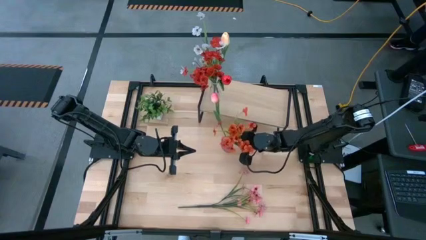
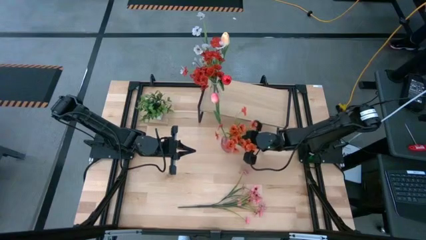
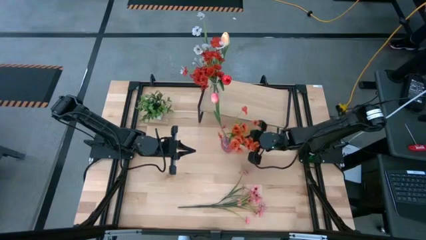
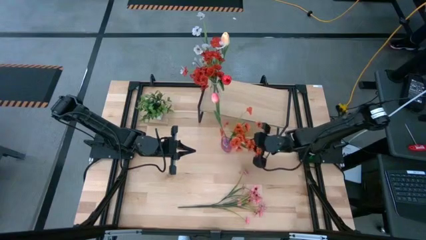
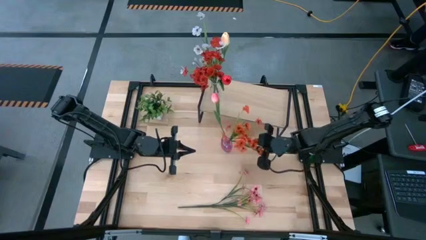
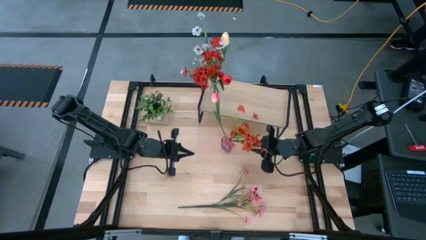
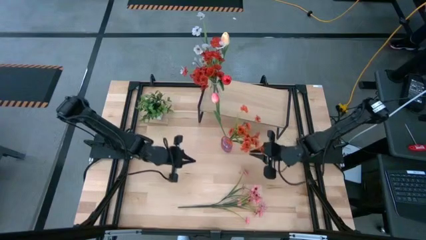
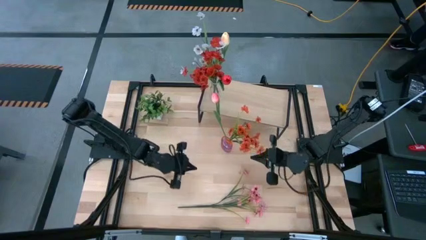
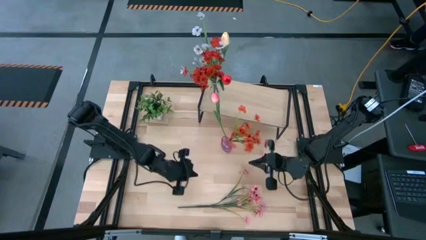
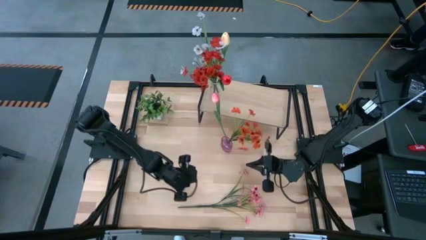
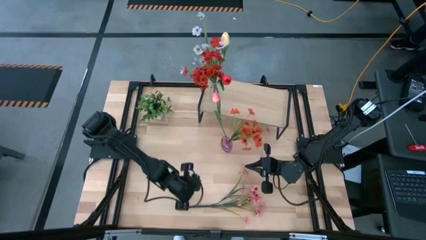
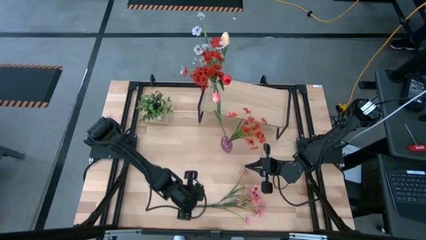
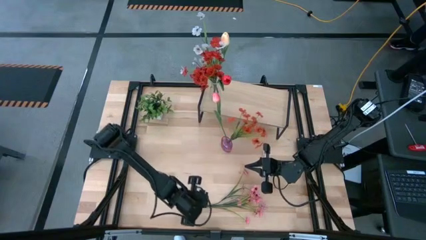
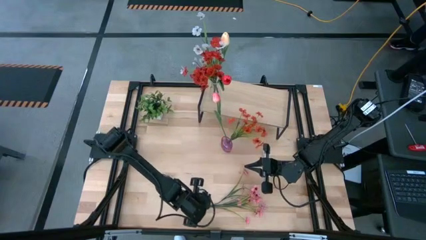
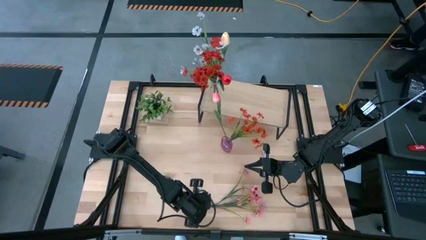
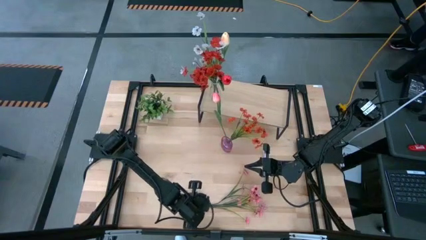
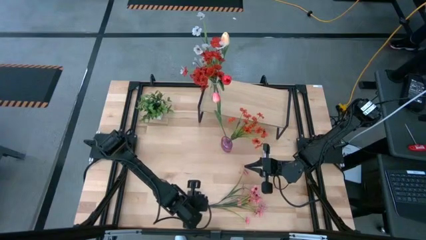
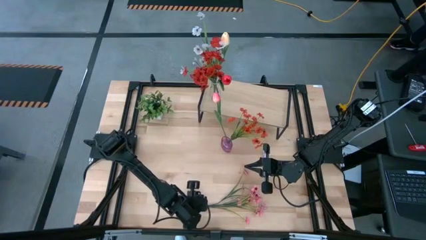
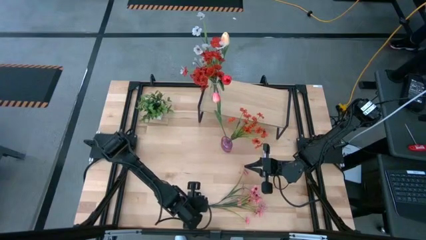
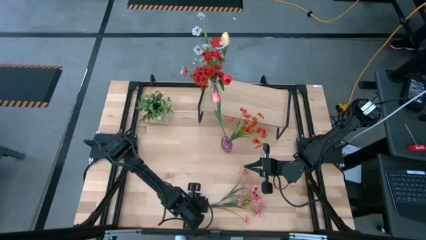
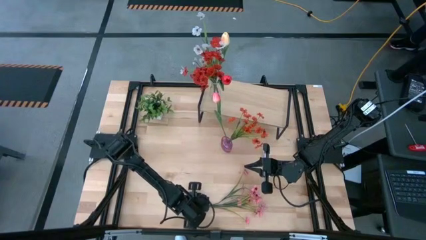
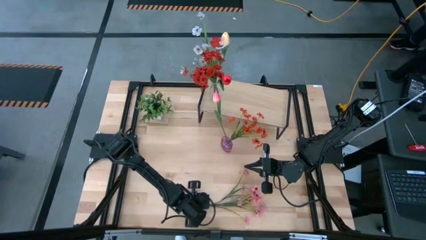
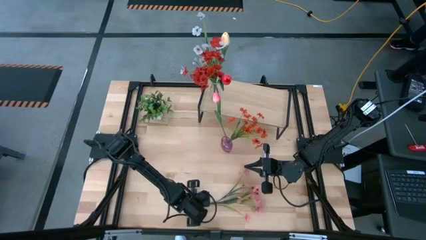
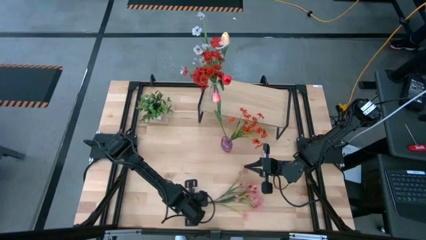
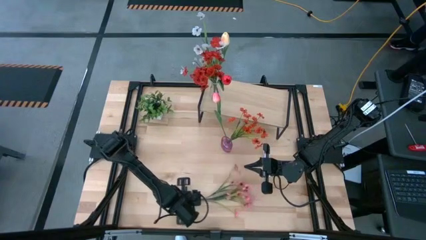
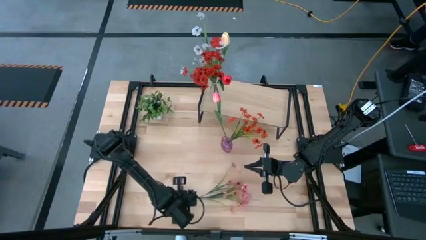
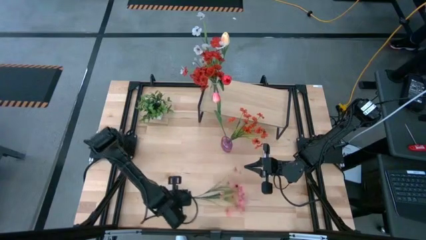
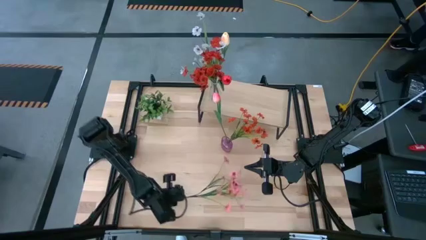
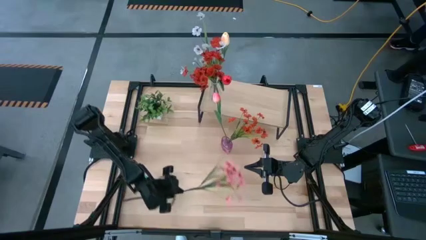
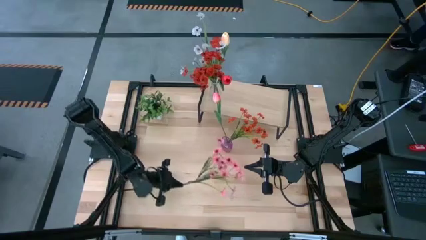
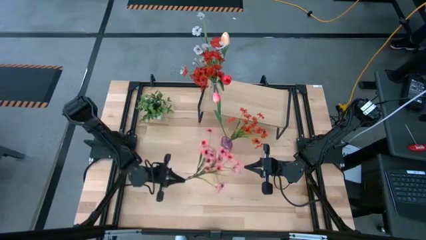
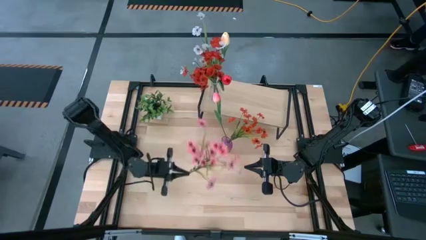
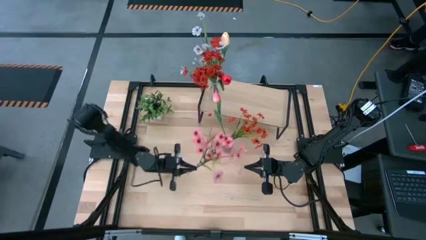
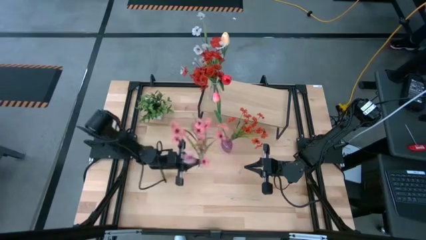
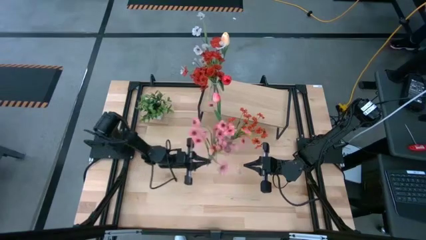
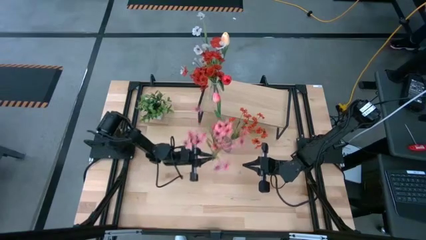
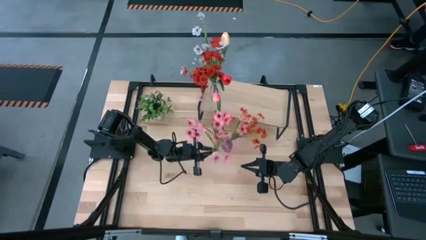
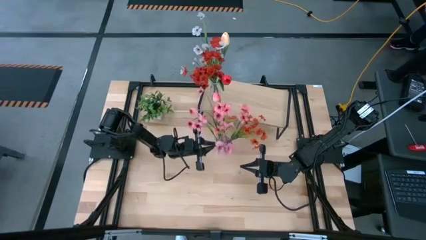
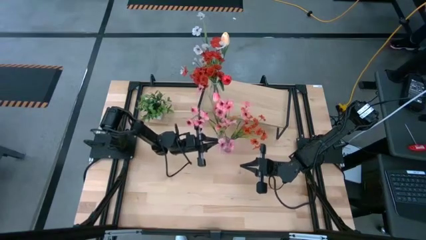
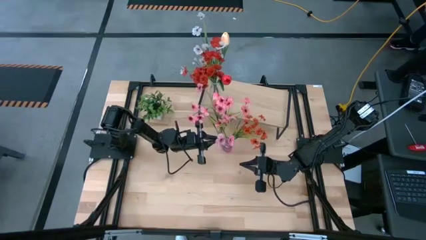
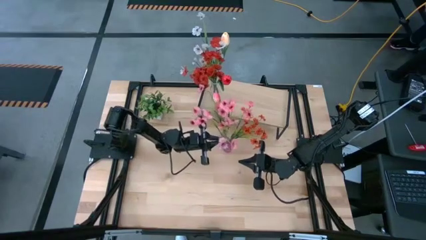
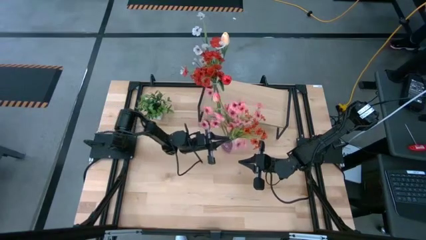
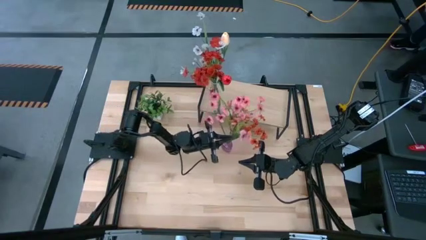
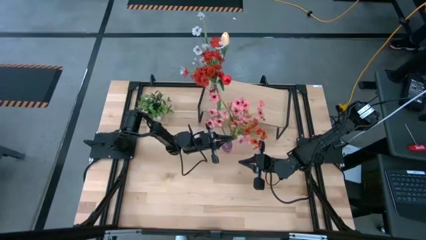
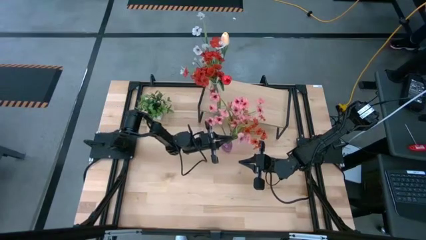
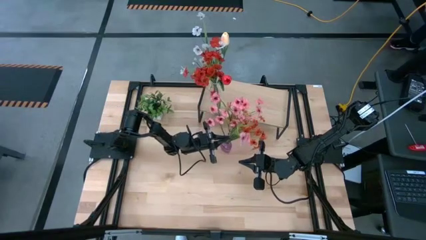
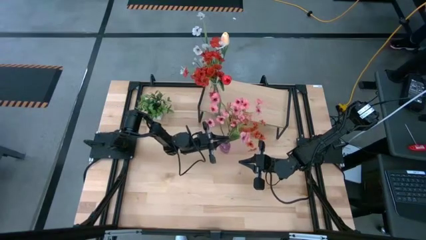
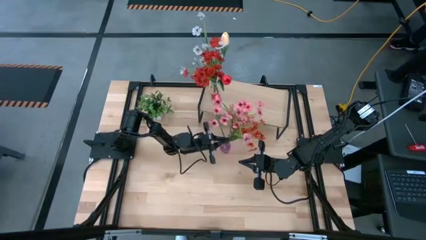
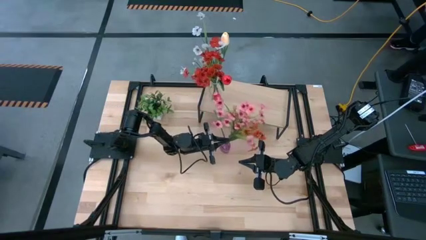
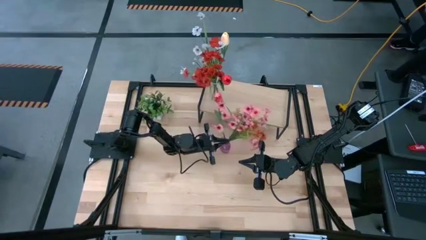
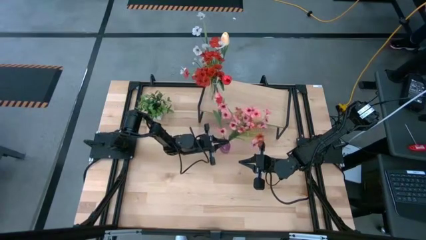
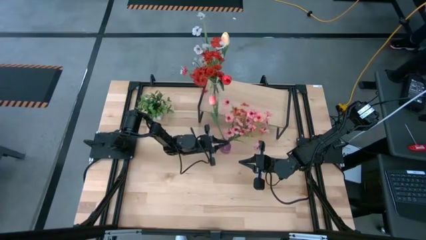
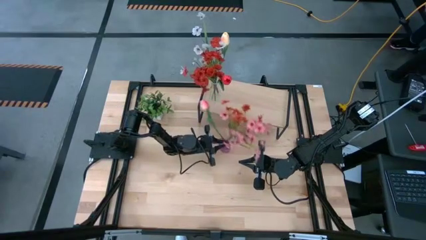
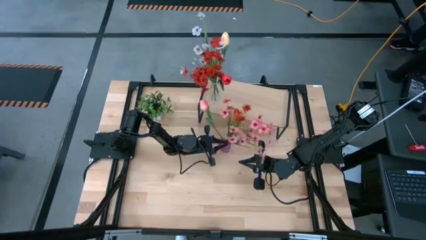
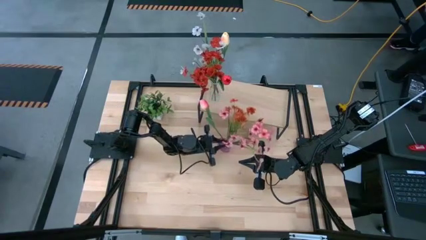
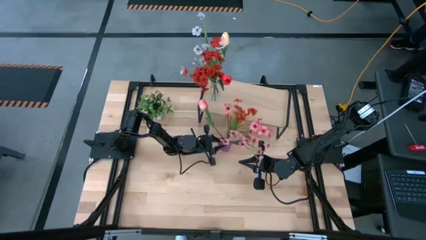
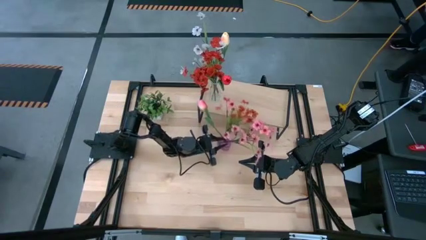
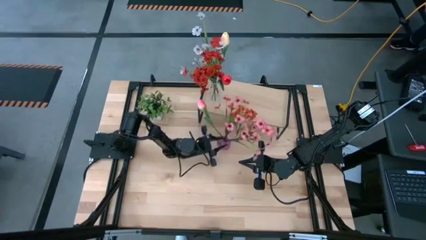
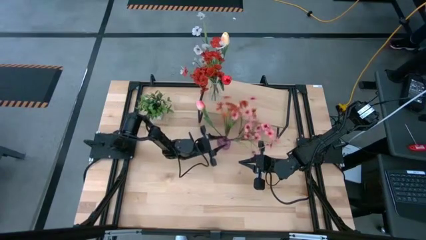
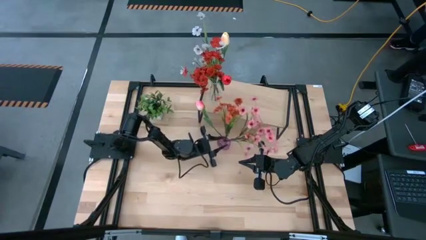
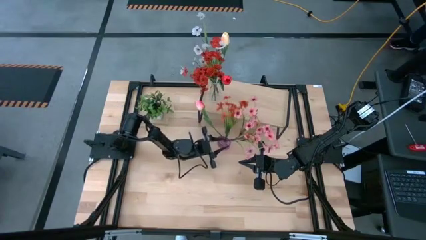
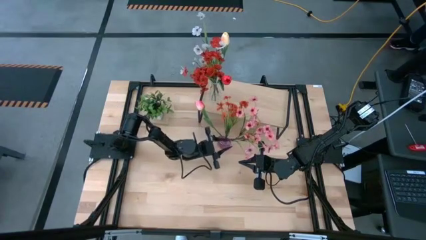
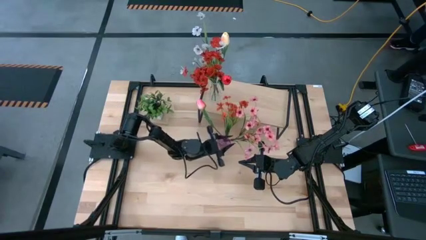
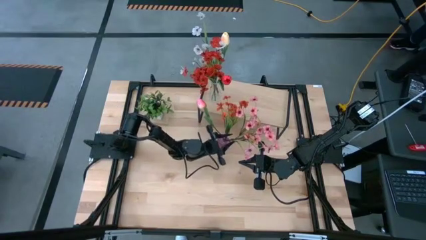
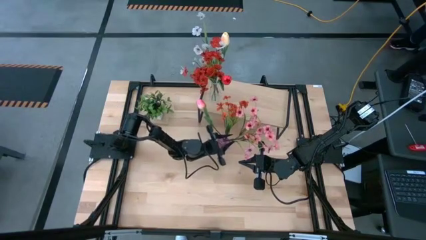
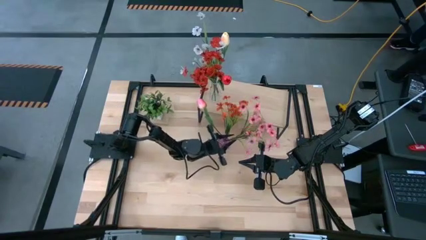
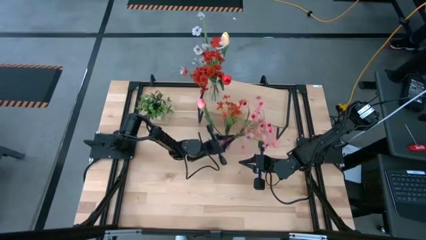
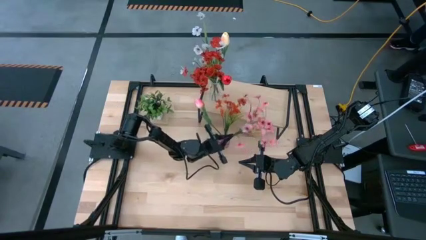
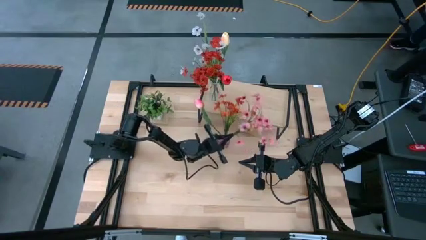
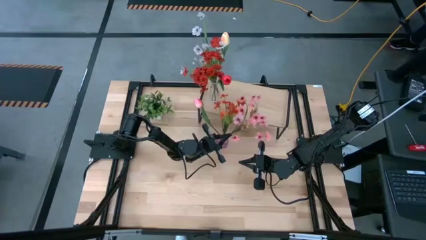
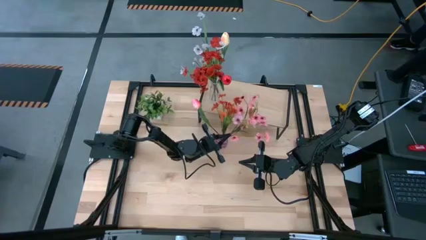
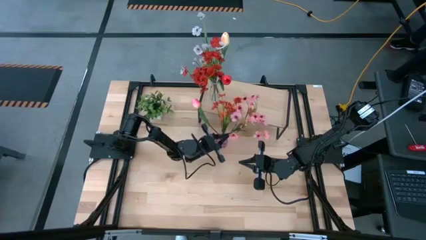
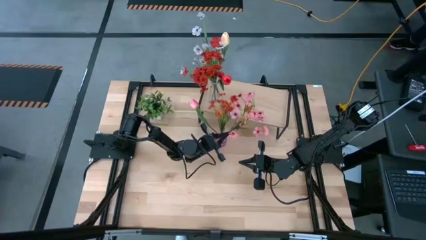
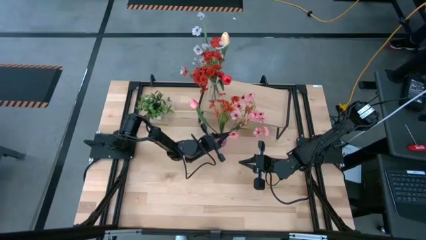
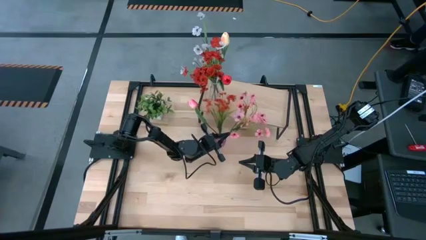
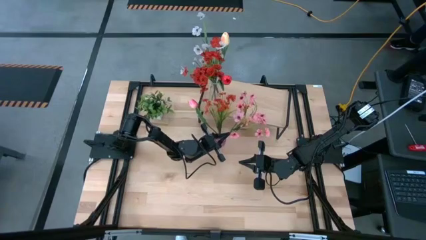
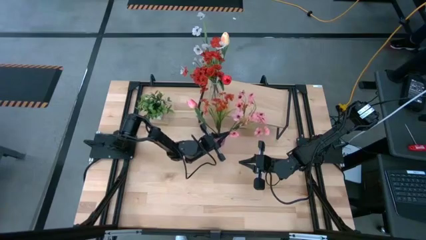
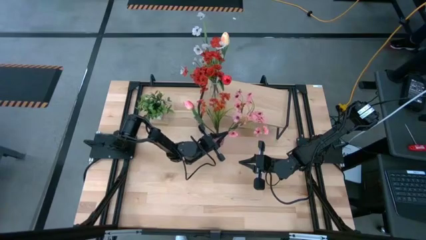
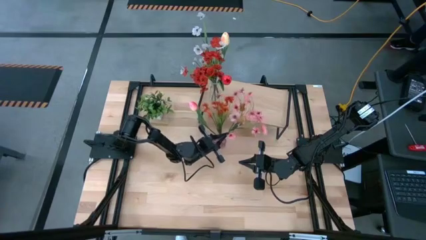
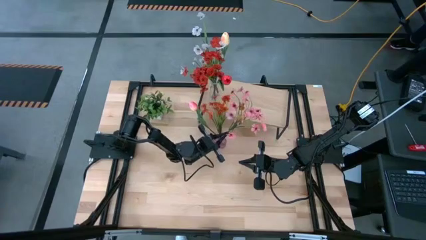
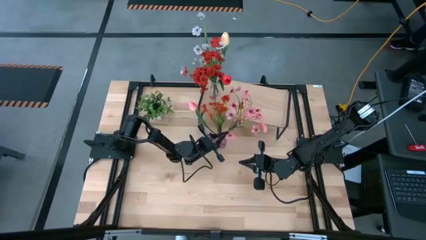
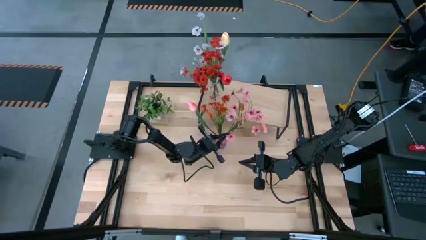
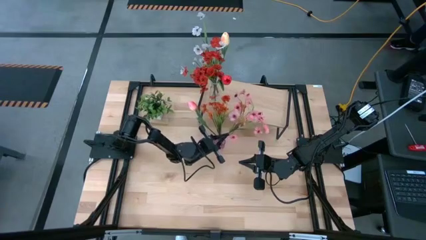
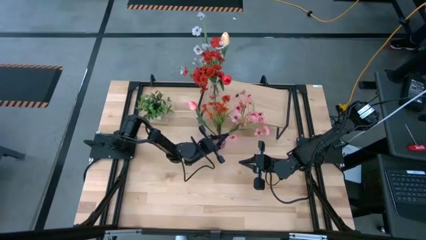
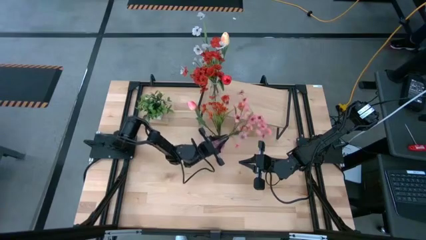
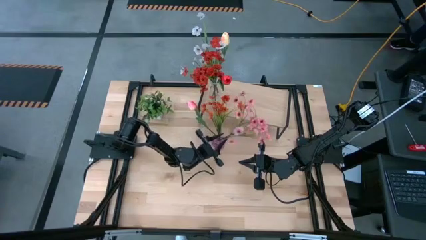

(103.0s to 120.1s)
Task: Pick and place flowers into a vace then onto a shelf
Put the pink flowers into the purple vase
